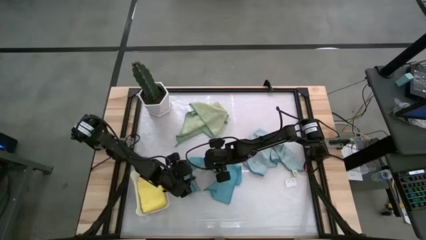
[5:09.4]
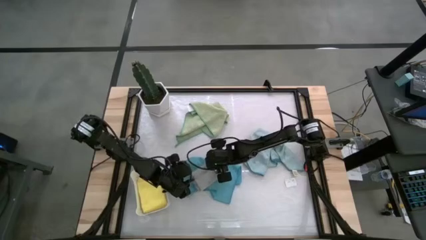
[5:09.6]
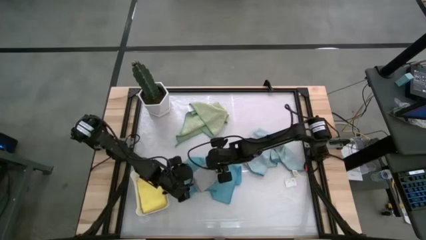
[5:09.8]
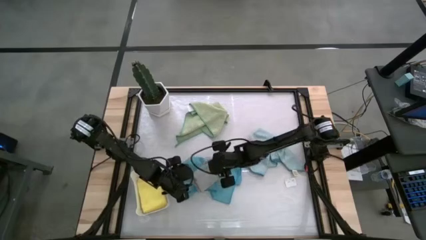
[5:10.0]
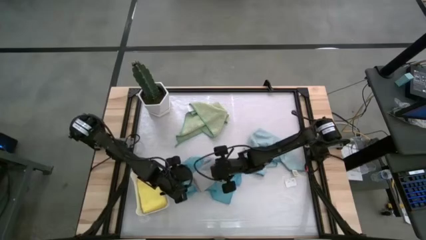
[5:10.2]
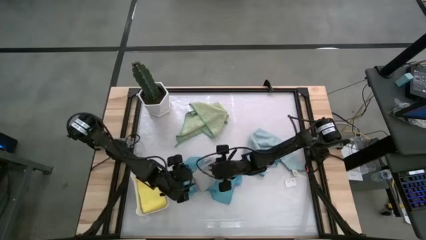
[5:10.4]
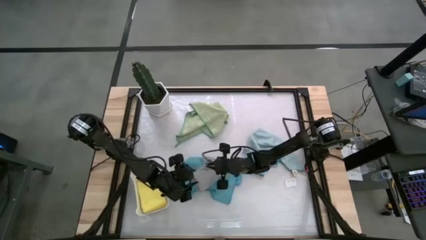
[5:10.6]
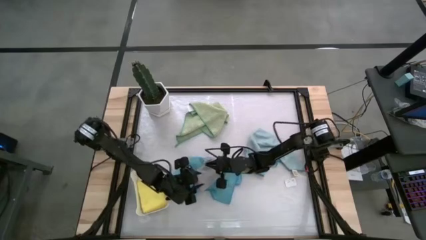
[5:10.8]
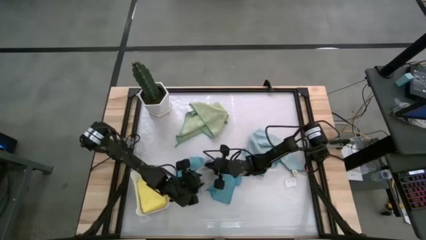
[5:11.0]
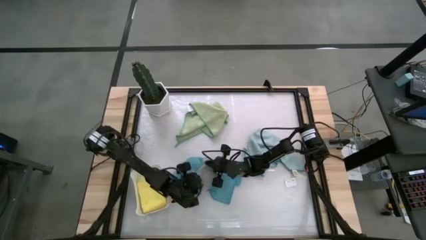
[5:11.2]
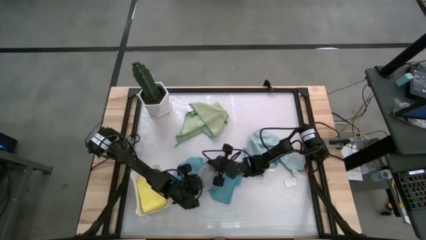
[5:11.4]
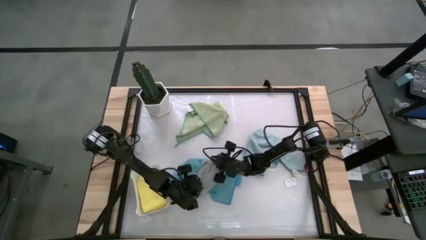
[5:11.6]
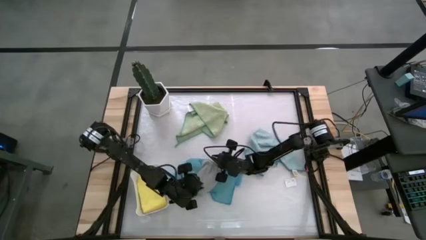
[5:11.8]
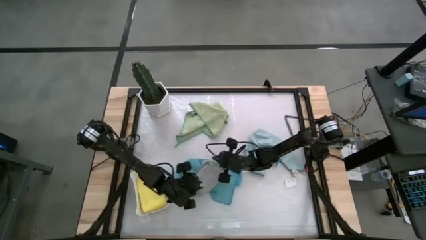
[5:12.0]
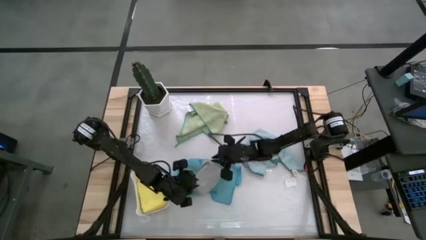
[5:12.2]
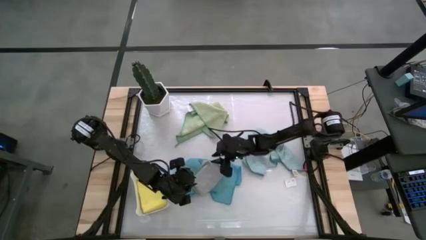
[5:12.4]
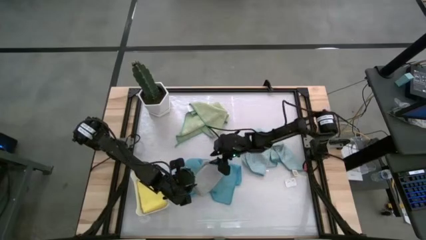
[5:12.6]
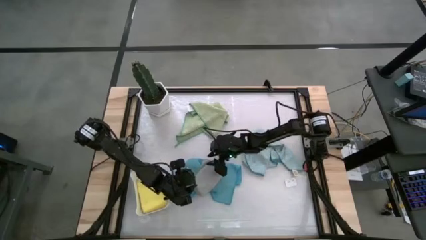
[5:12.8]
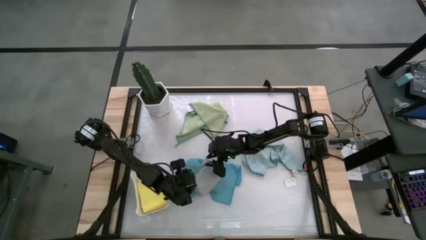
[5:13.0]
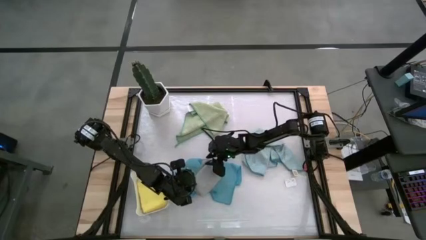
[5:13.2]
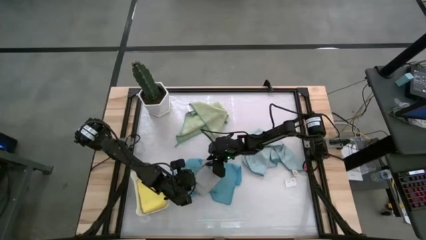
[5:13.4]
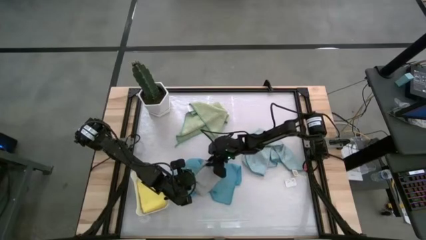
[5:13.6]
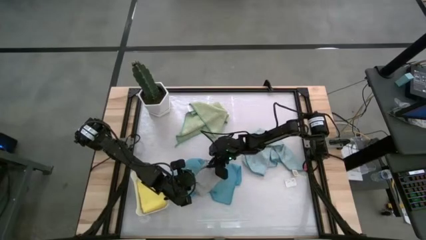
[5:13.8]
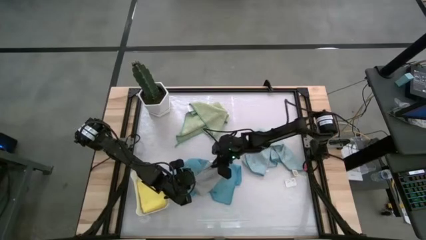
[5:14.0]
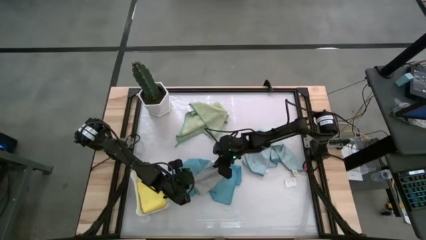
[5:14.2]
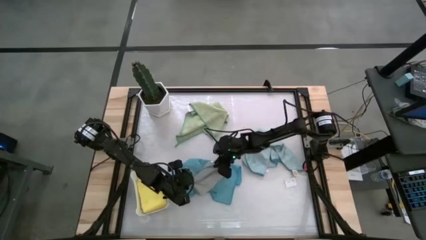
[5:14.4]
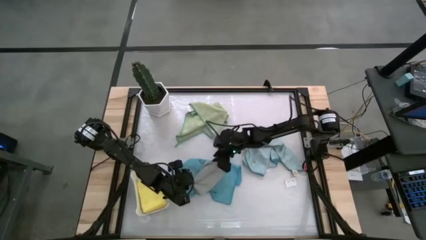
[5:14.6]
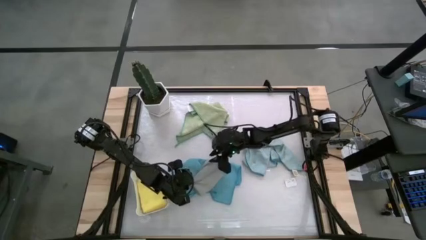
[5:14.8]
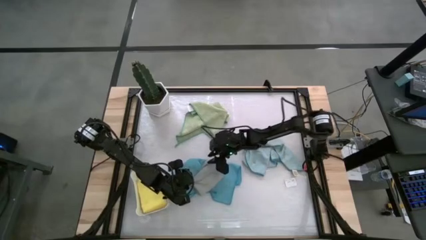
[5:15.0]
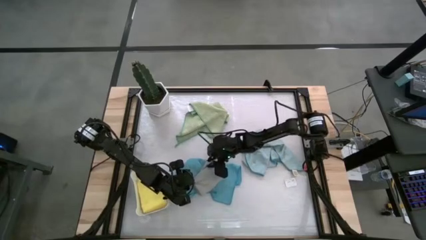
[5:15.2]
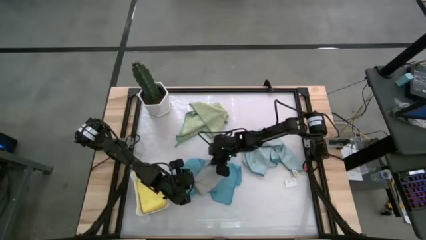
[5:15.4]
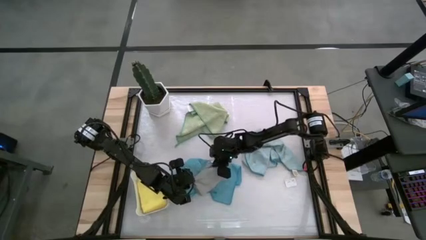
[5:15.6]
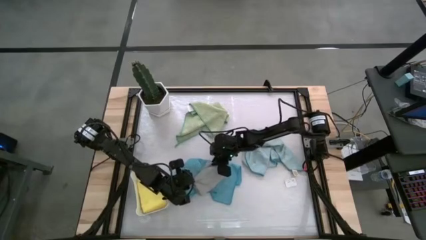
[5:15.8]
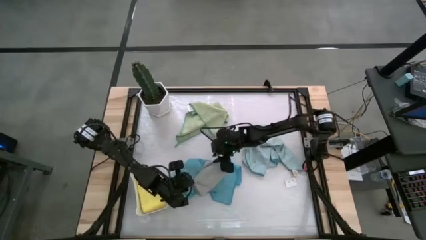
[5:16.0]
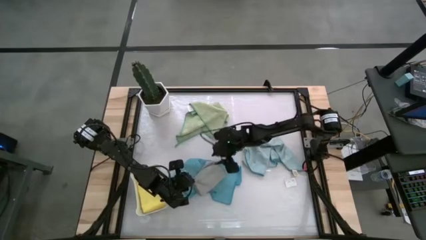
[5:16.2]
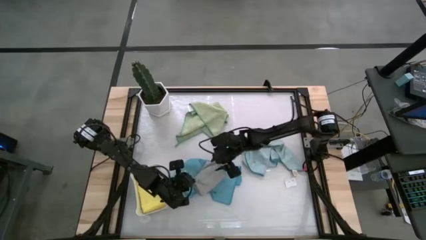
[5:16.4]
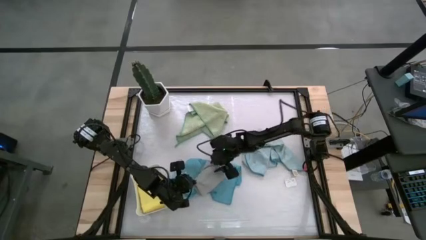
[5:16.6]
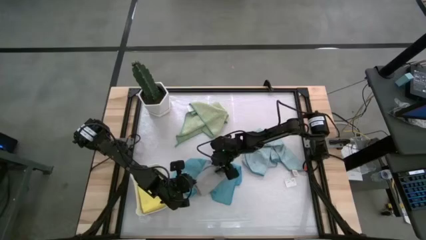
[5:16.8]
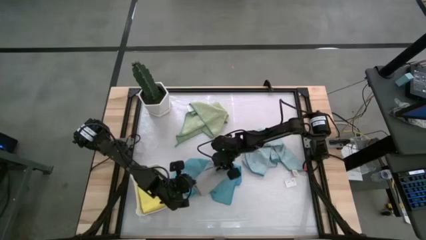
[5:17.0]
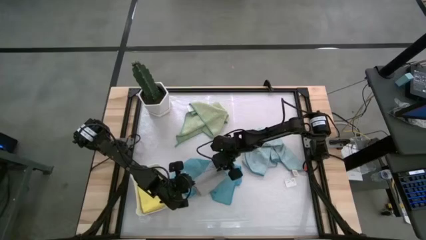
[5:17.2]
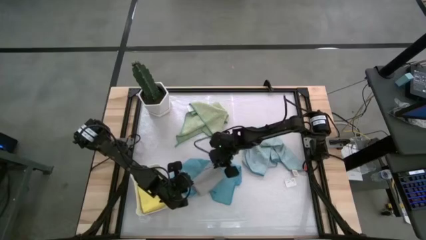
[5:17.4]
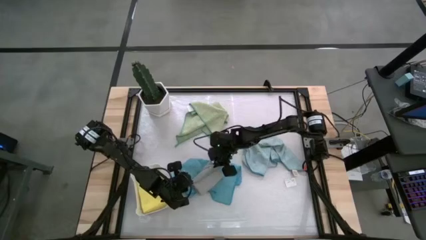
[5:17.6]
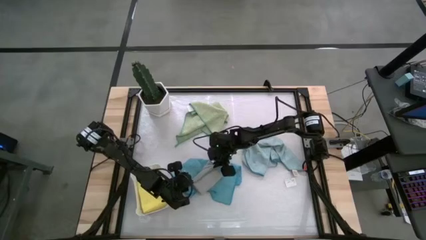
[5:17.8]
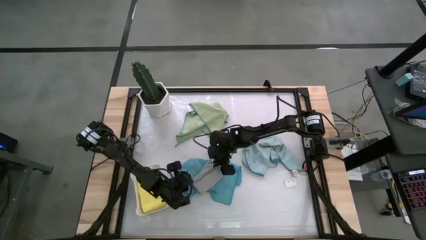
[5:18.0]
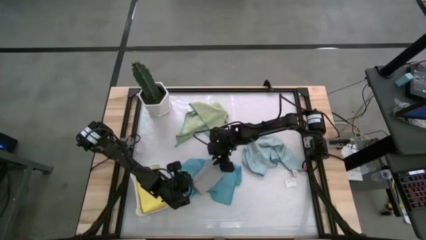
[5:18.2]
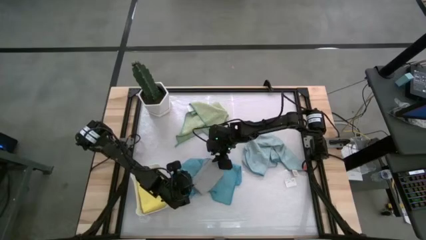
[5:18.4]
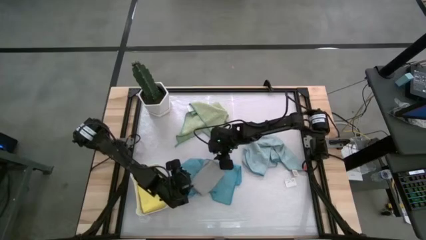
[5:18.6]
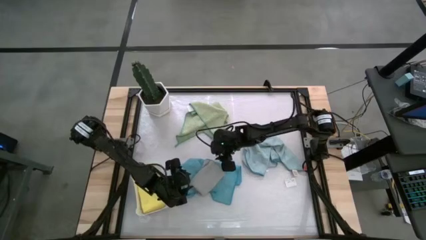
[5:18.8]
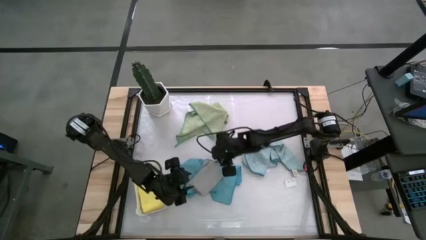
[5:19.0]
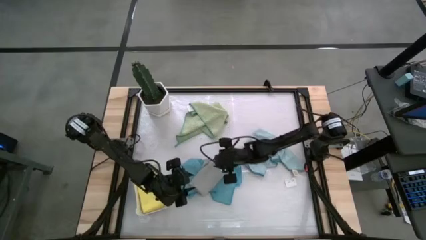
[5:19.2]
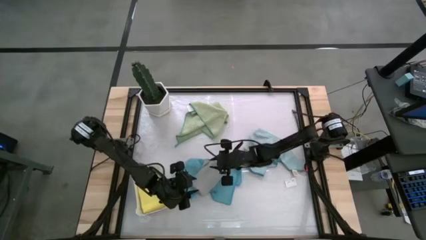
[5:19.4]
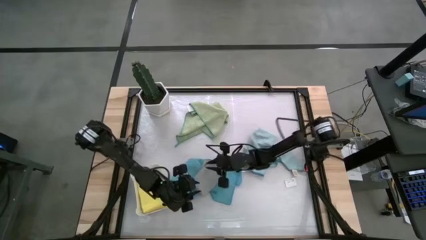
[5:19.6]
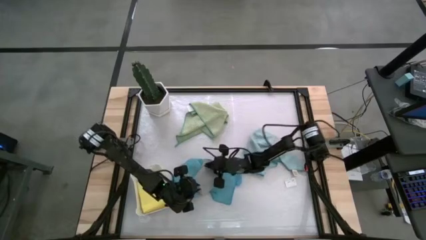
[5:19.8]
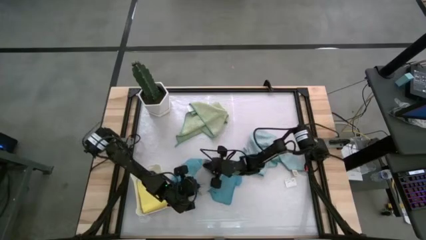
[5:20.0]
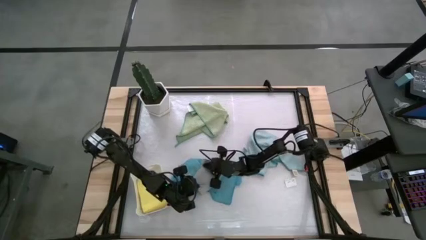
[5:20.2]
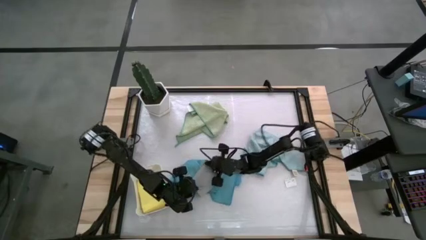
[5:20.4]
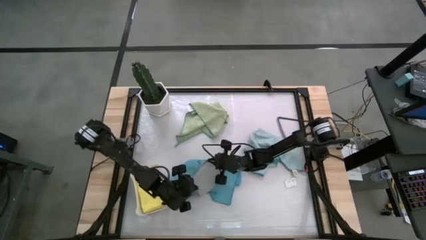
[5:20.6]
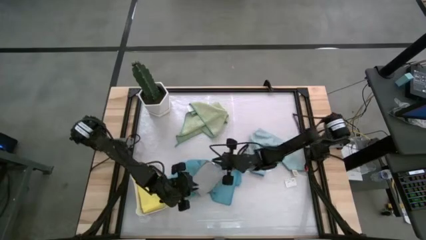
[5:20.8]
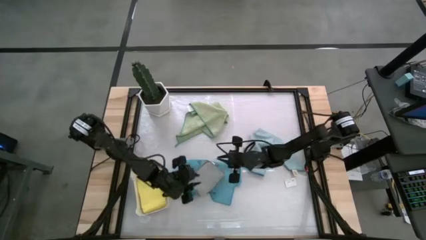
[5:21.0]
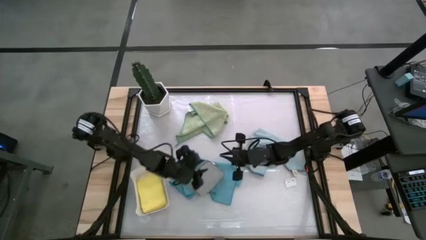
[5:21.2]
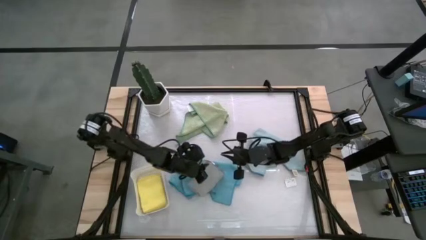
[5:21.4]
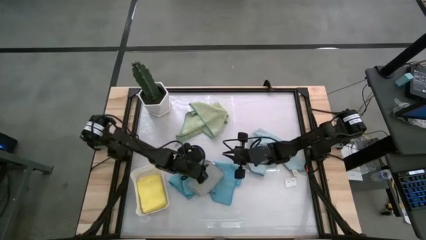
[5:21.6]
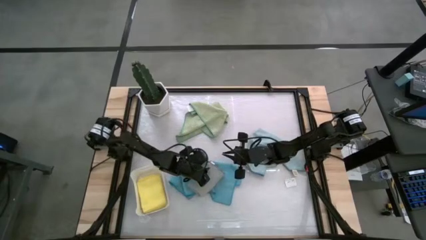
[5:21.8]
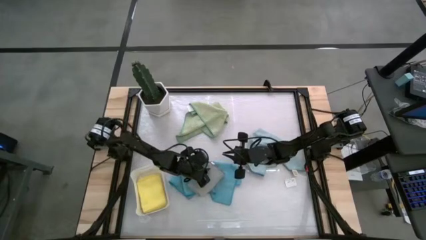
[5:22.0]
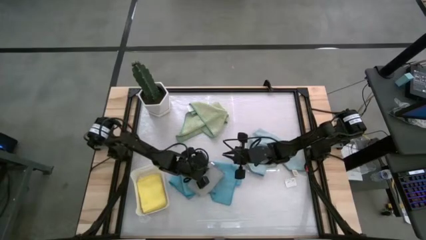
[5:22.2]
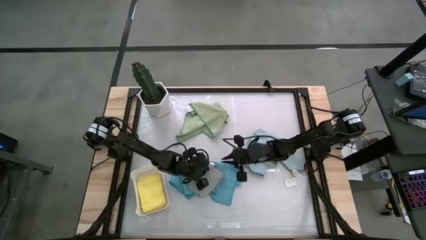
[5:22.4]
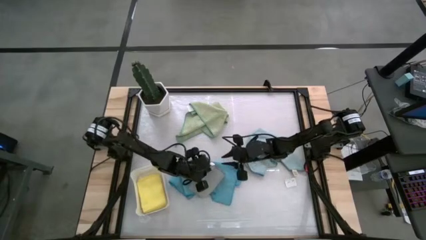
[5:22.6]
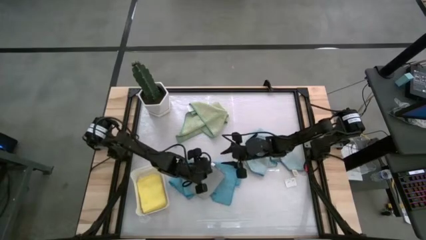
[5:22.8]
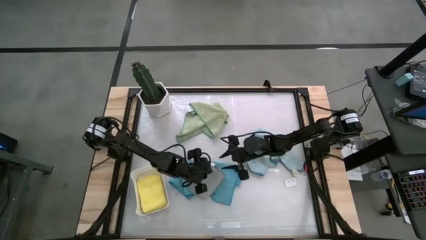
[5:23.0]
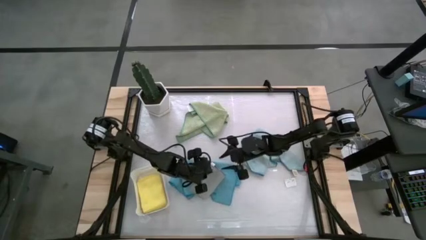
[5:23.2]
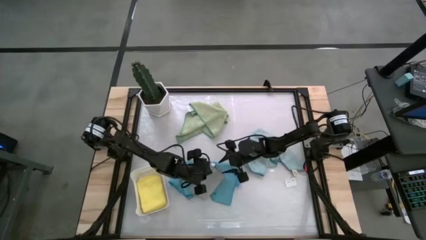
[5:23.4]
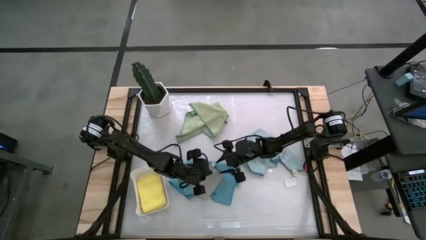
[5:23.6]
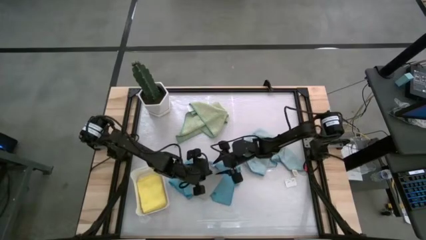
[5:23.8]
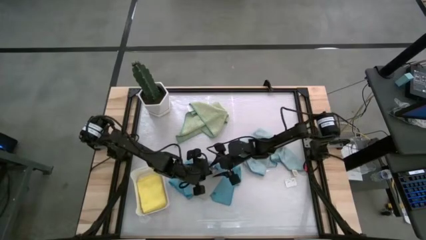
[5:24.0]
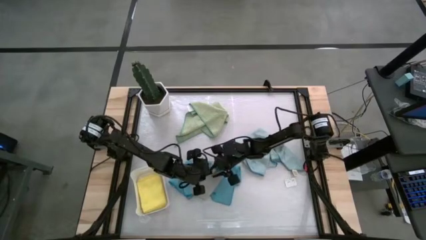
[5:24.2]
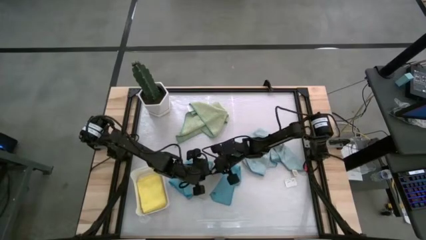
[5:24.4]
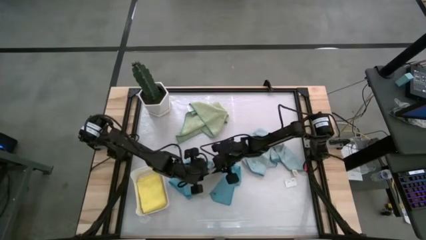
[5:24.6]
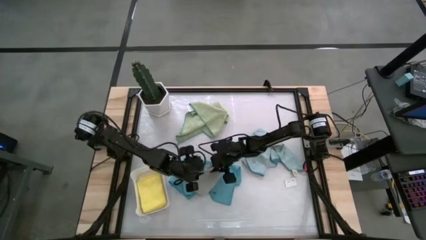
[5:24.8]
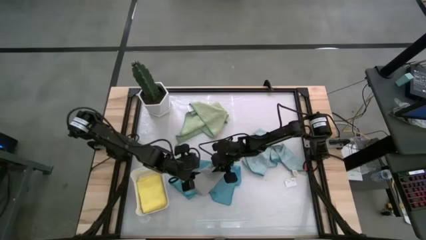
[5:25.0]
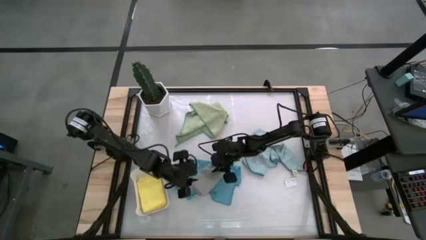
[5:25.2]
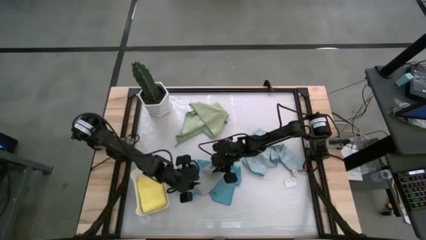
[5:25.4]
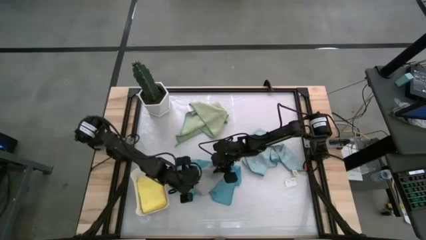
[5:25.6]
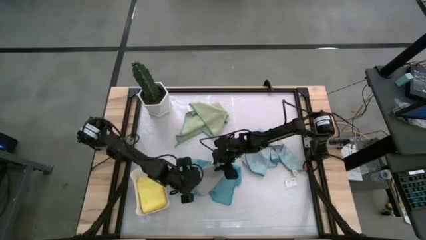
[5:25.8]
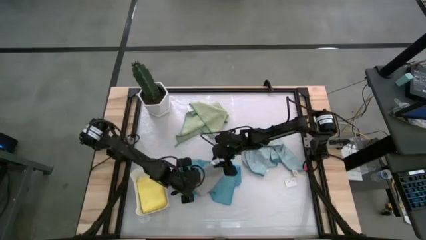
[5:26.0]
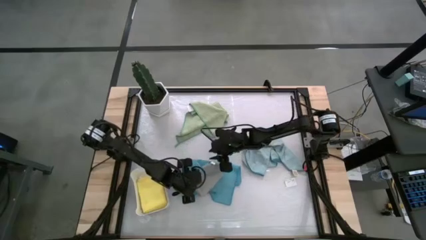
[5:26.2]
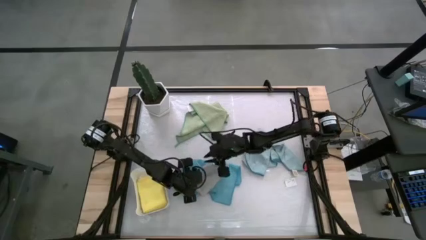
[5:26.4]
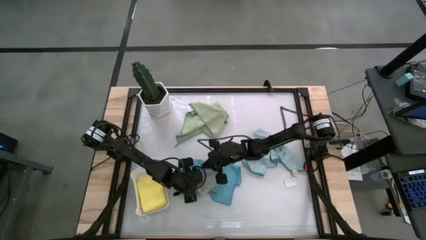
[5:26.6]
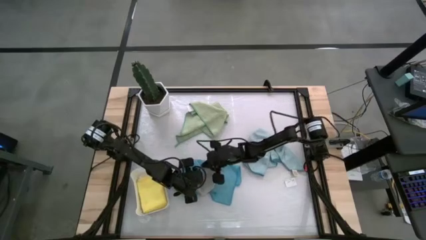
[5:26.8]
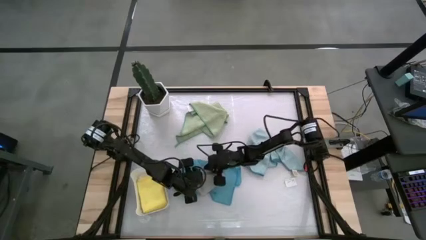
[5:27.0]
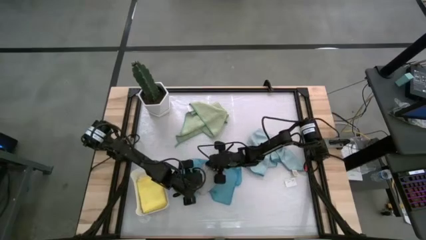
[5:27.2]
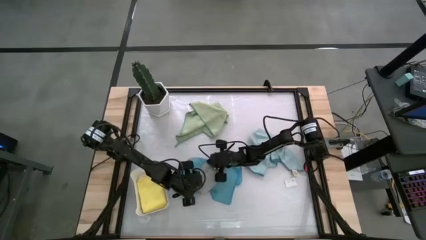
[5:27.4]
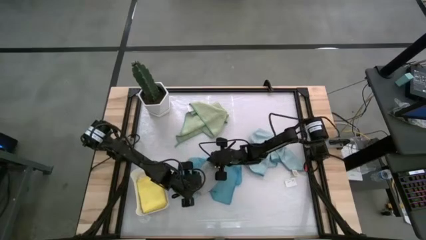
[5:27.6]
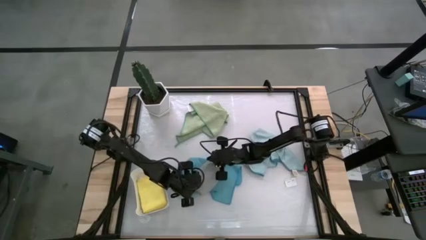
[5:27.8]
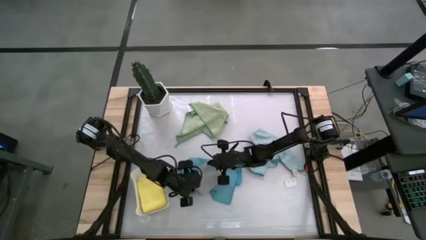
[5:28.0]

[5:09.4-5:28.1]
Task: Fold microfiber towels
Fold the gray microfiber towel
